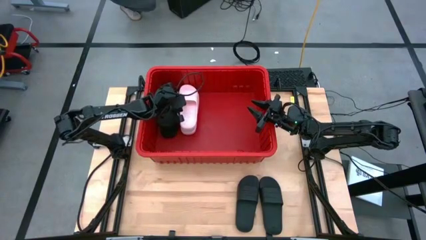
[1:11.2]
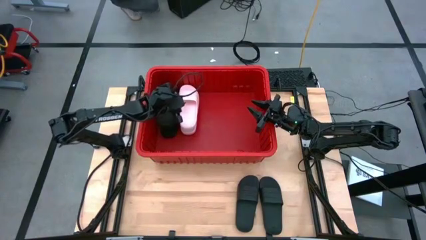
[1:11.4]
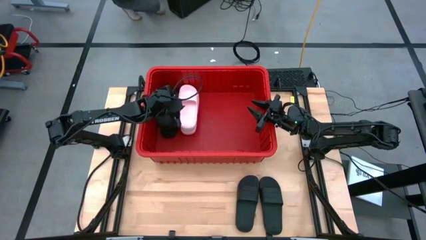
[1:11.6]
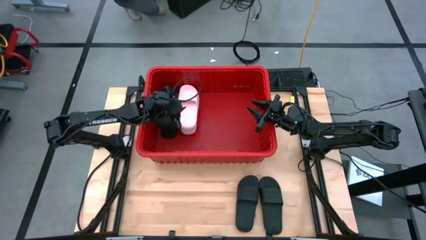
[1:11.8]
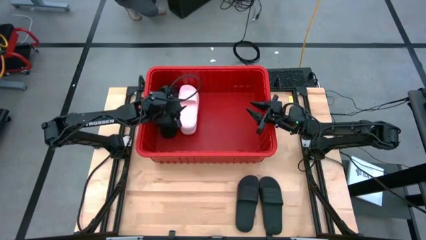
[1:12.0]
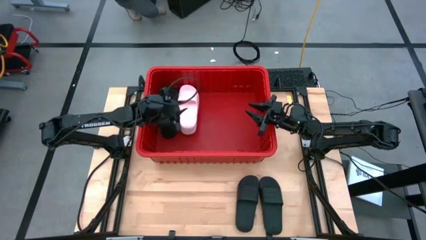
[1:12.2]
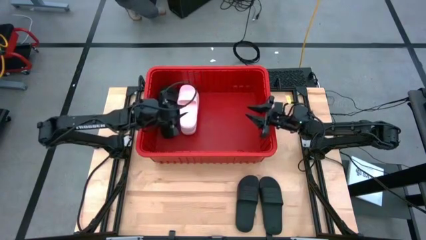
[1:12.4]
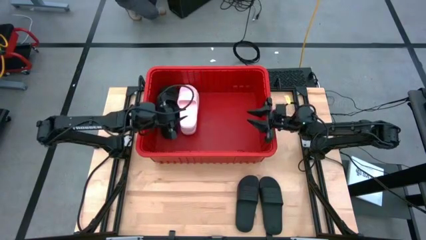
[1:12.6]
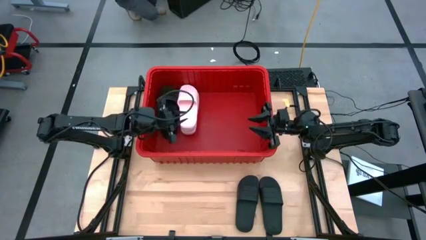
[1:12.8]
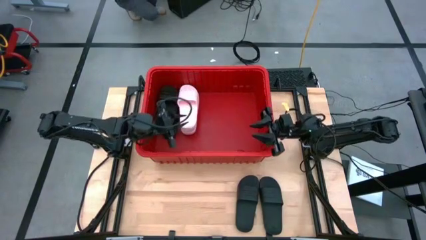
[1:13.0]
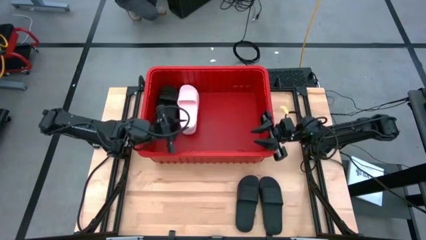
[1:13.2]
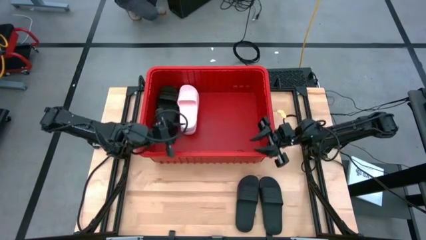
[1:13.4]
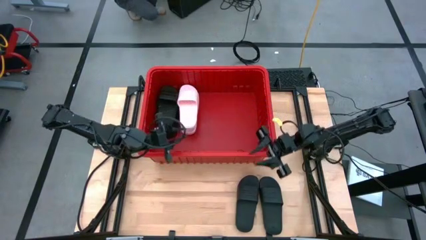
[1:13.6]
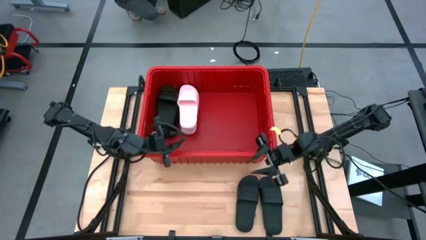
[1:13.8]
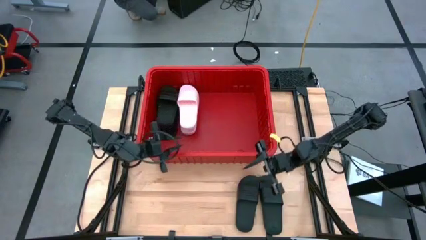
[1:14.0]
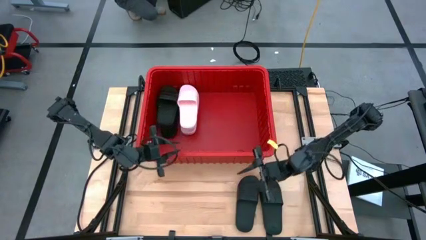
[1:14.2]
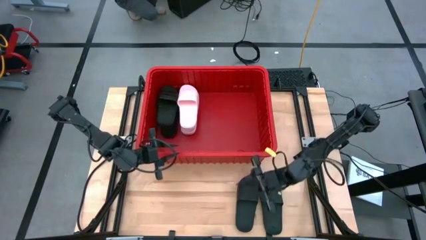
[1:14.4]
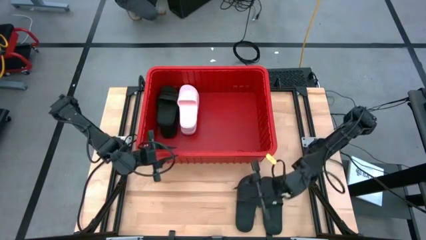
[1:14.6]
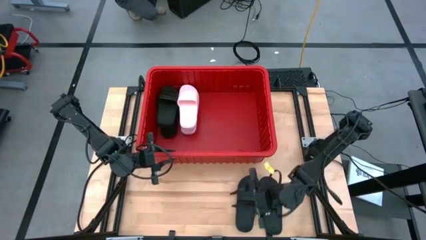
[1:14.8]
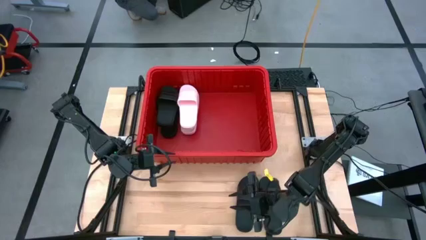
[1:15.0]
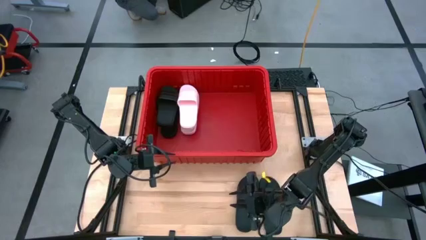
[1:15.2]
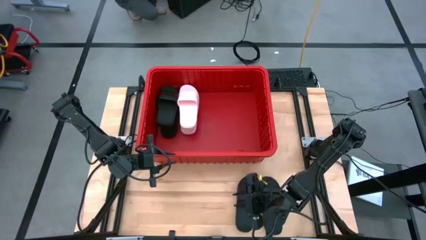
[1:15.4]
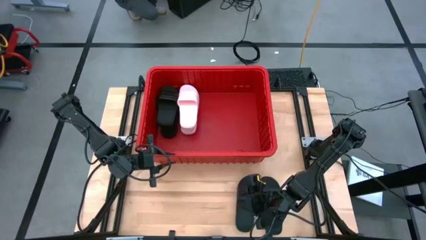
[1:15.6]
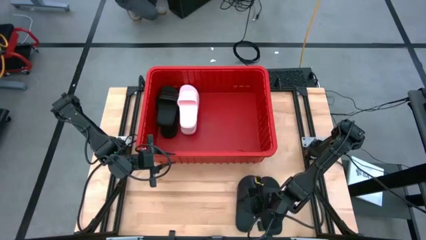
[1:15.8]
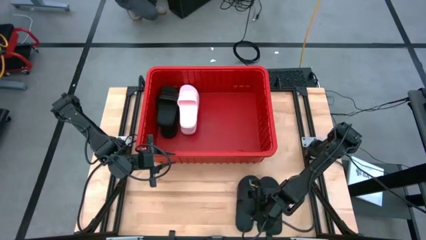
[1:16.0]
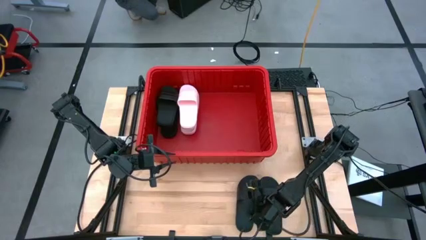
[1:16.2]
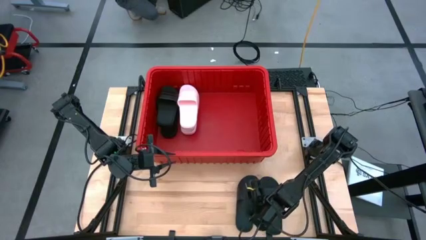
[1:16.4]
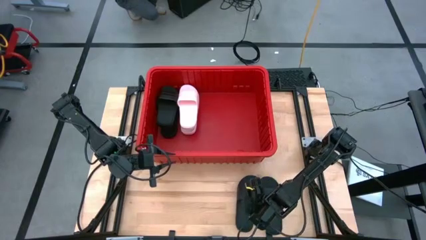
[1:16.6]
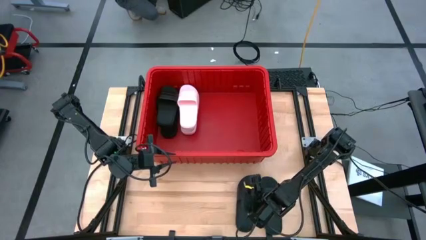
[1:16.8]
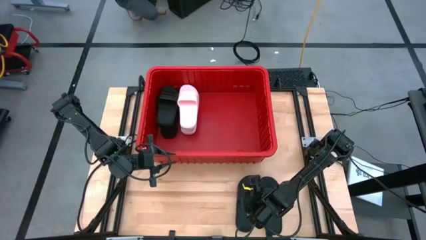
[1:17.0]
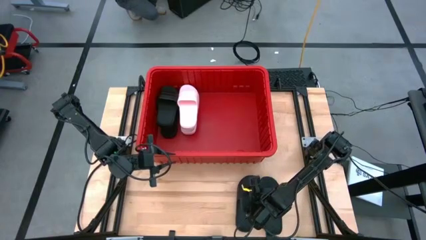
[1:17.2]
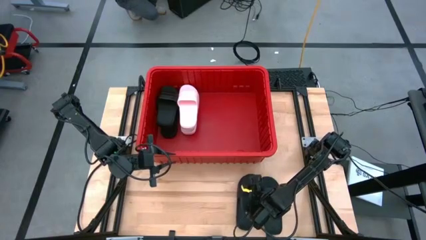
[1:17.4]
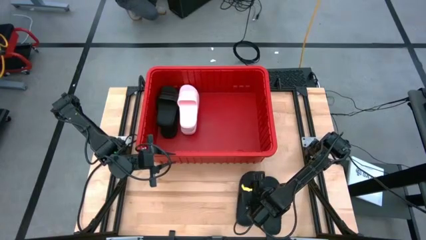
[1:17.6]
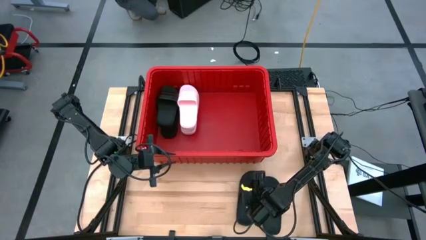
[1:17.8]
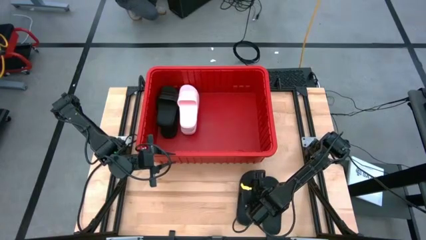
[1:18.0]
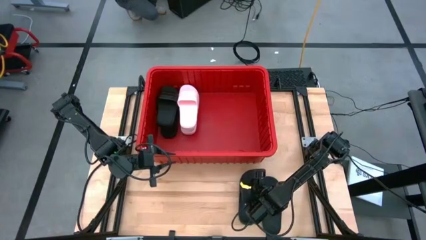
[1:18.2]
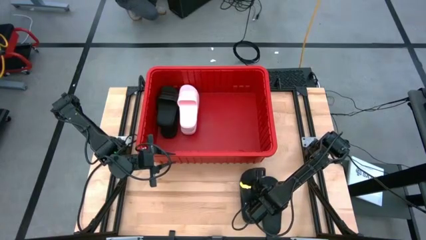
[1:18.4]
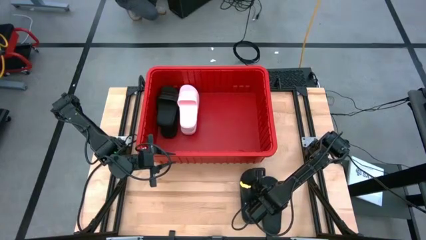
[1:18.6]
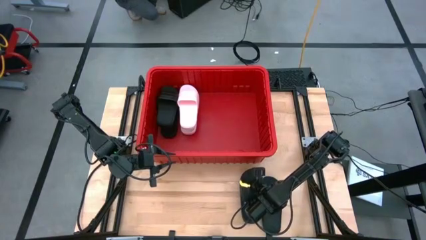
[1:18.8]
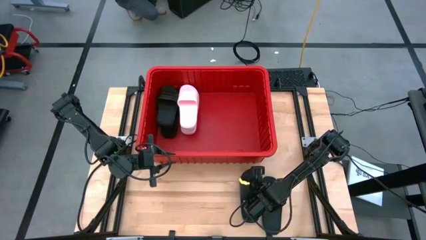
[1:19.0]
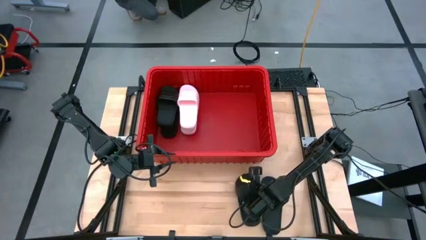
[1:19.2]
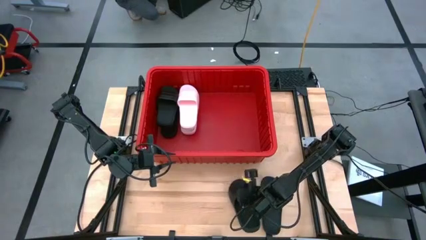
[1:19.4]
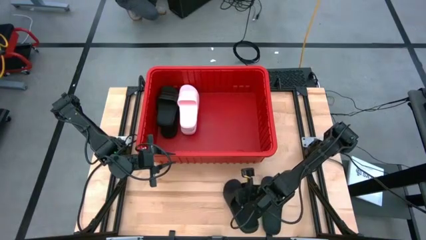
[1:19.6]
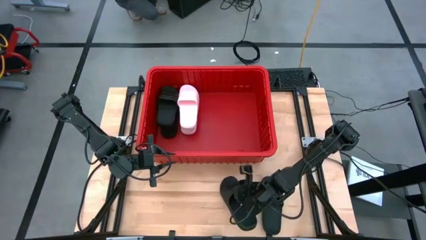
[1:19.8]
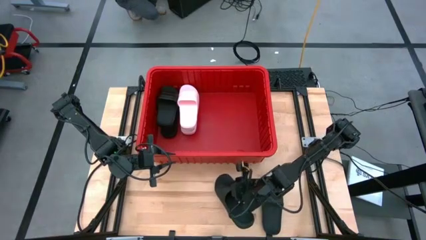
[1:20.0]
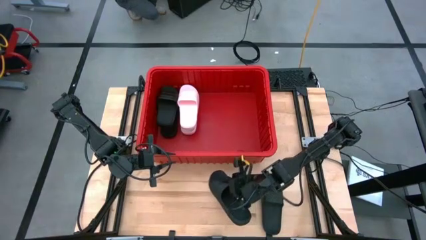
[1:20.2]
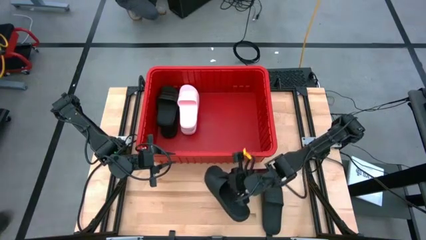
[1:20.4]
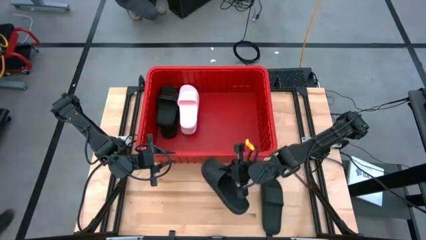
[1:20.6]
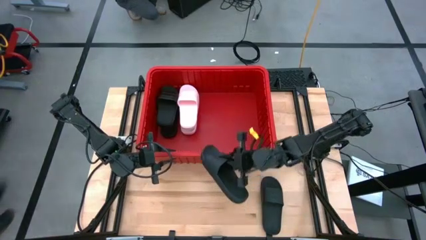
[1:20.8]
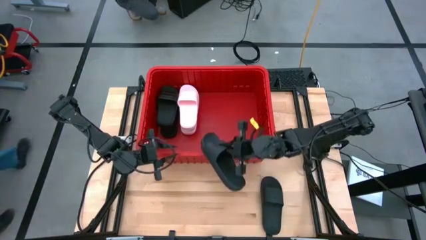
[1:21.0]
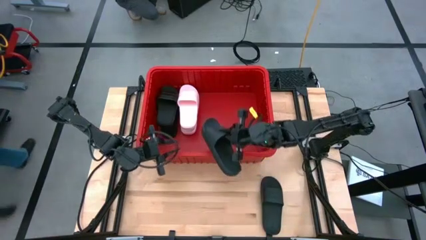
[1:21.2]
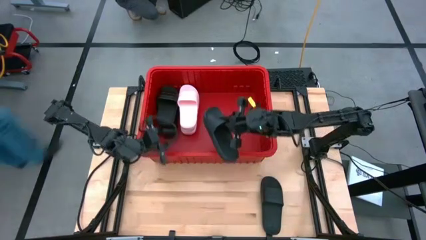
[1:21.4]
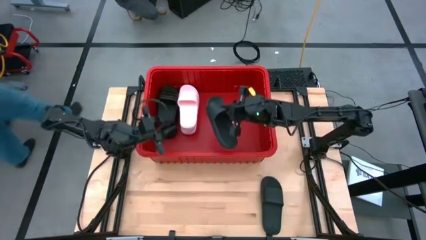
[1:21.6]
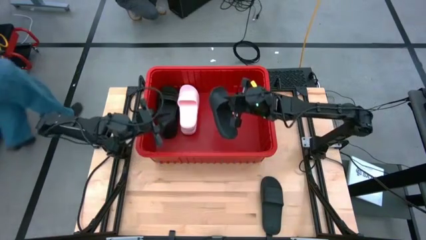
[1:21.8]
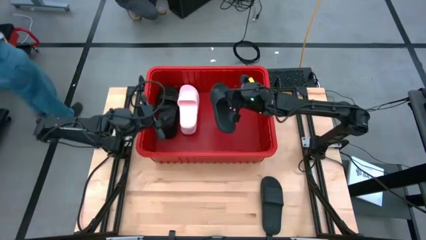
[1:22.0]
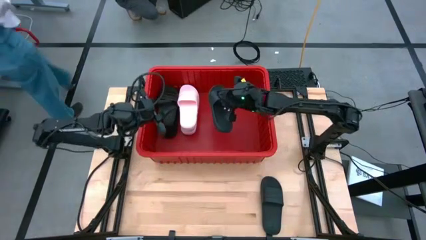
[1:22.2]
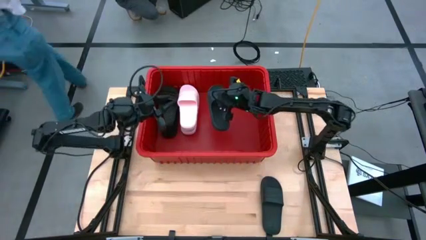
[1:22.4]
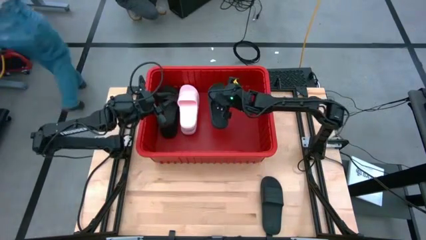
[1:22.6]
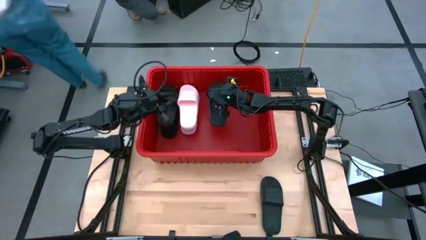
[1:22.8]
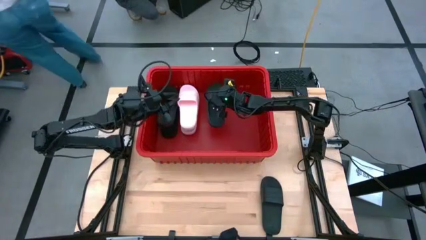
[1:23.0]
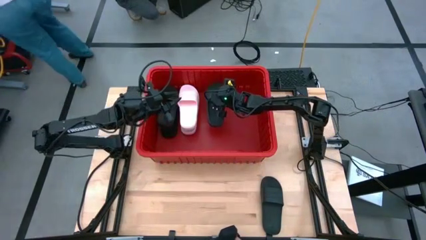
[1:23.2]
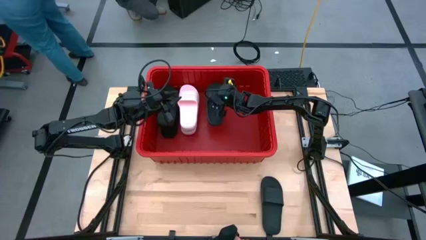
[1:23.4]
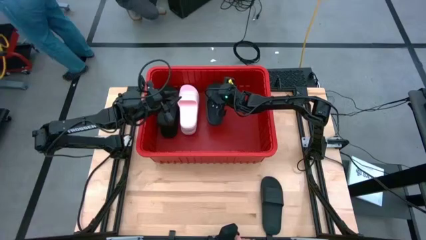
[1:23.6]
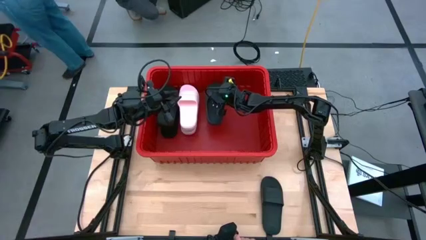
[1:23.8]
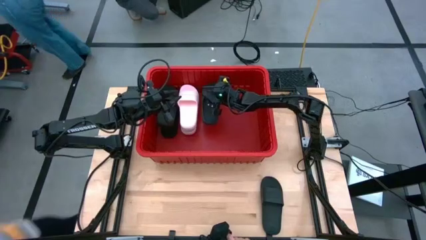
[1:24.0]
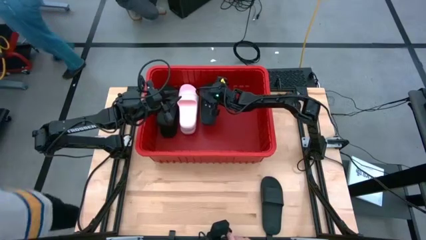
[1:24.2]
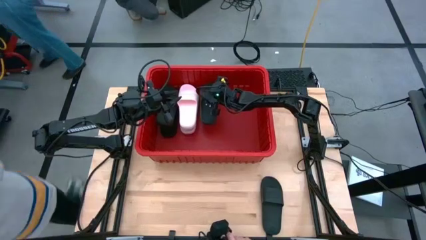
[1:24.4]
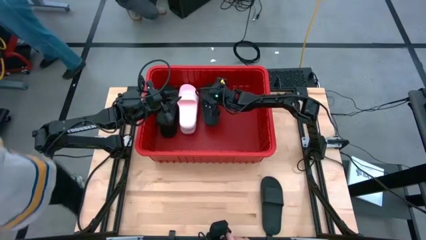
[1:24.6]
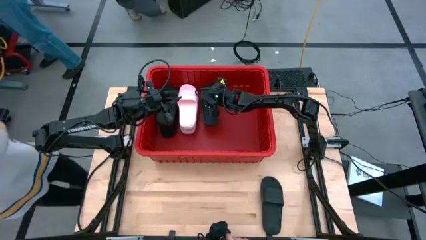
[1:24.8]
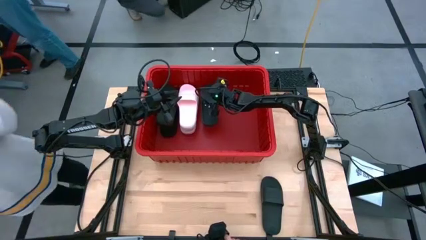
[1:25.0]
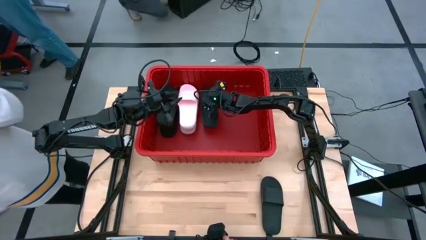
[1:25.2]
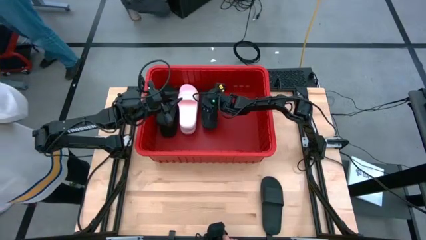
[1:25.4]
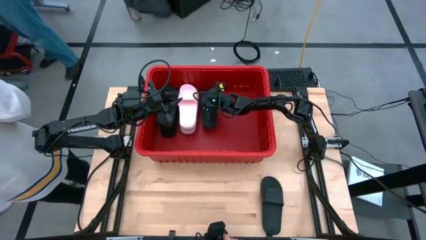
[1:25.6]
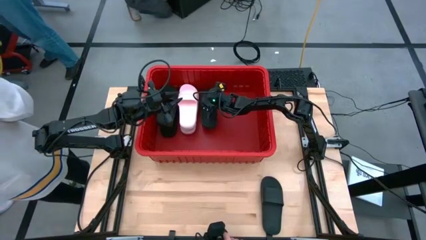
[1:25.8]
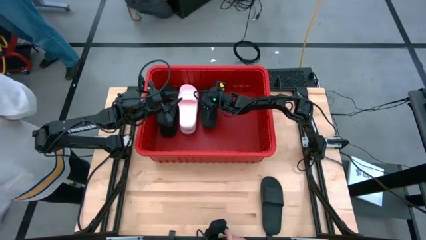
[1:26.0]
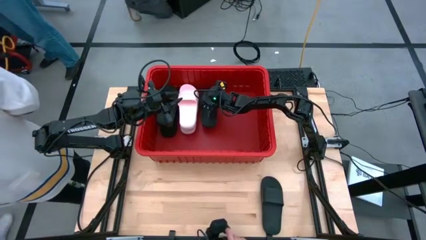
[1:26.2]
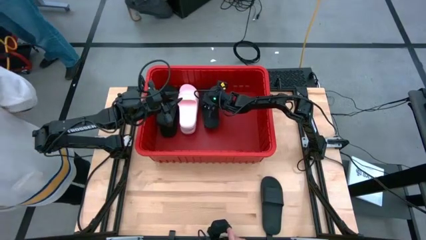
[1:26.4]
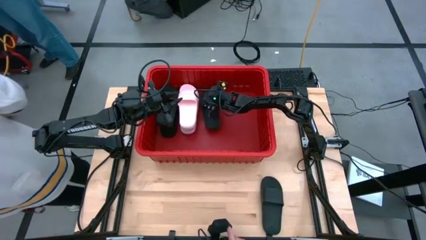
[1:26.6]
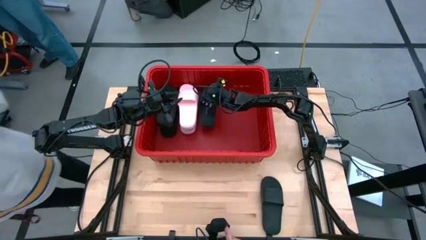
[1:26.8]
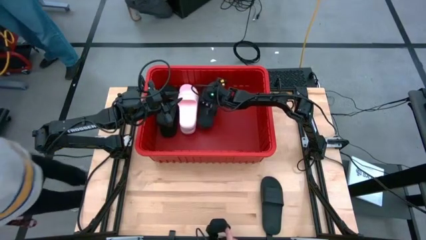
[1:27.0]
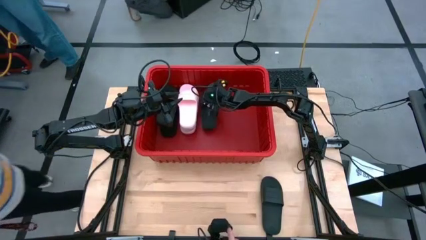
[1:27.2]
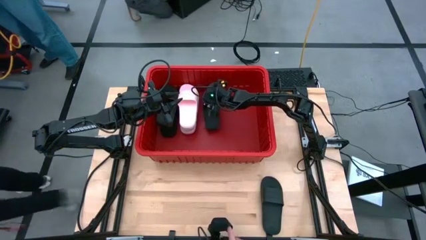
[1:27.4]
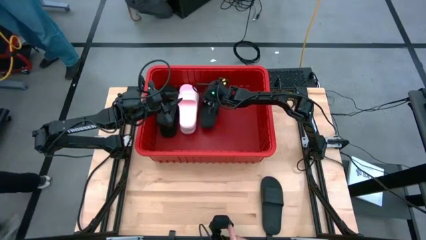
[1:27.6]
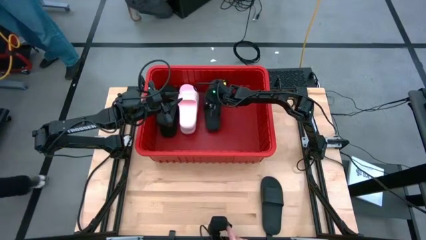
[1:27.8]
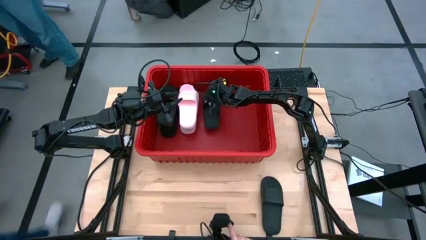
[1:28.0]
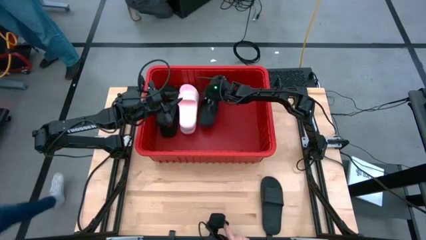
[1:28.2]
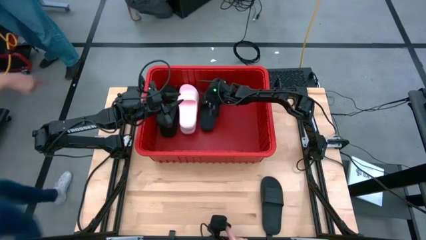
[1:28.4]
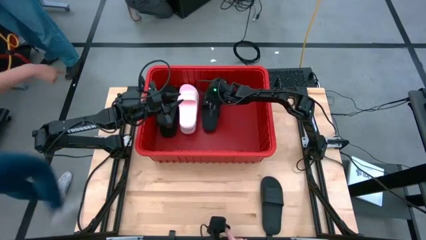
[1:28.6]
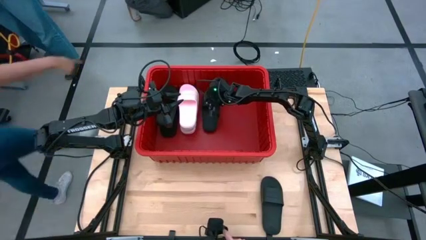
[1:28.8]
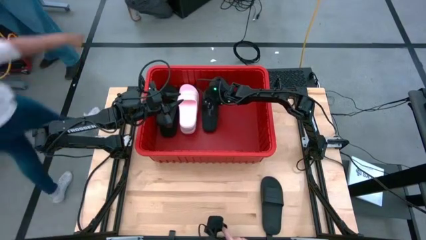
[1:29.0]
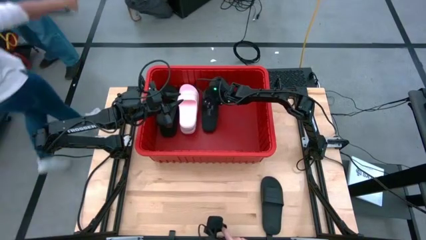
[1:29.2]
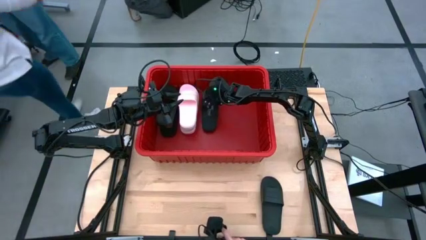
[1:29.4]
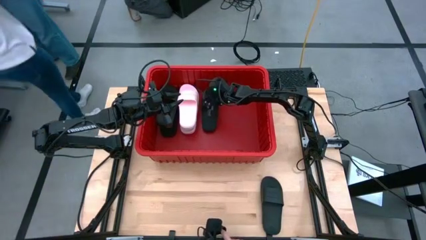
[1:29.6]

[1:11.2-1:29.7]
Task: Pick and place slides into bin
Put the black slipper into the organizer bin
